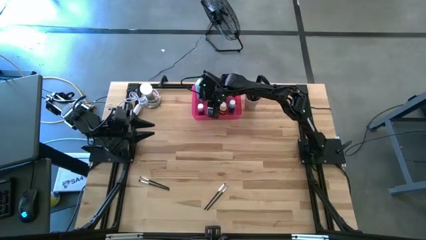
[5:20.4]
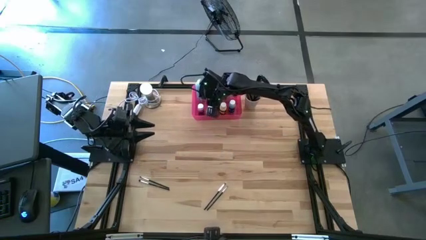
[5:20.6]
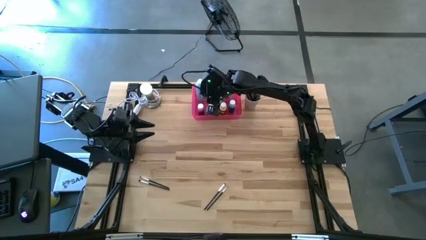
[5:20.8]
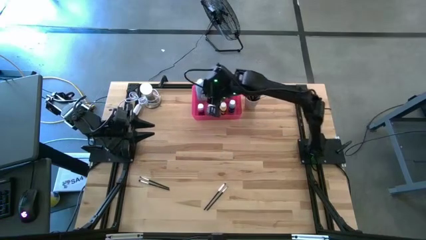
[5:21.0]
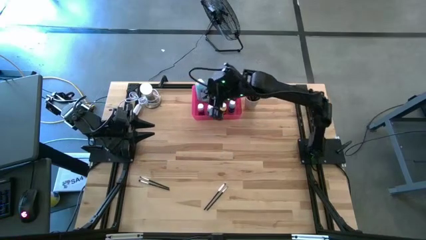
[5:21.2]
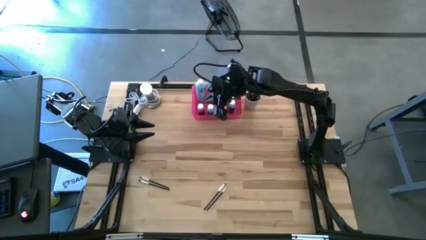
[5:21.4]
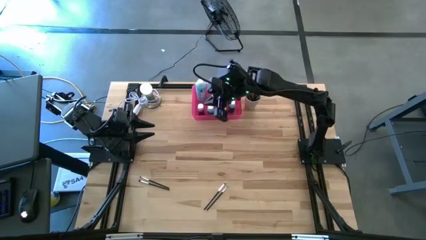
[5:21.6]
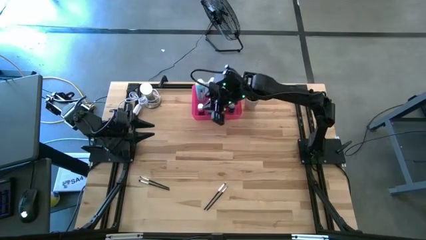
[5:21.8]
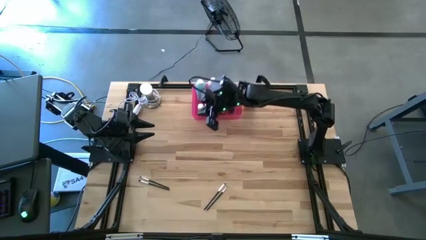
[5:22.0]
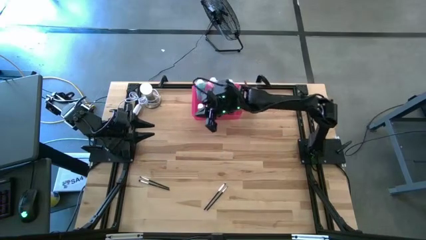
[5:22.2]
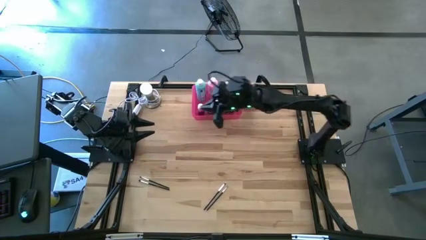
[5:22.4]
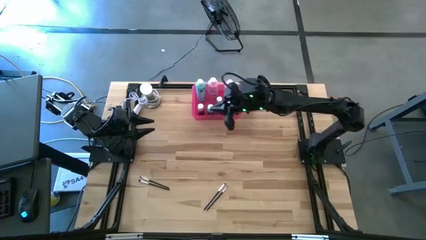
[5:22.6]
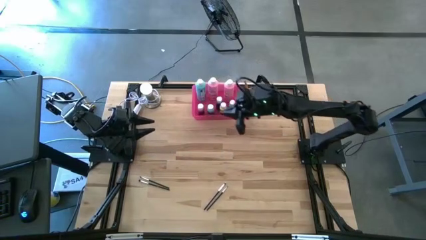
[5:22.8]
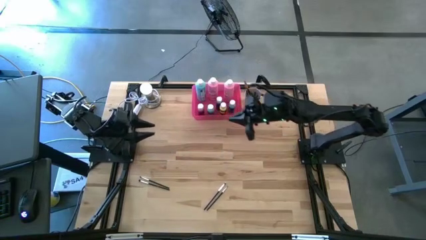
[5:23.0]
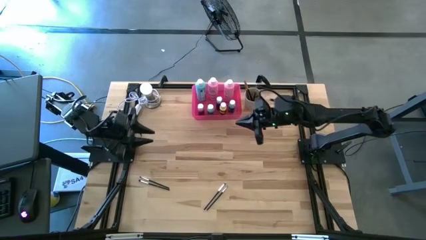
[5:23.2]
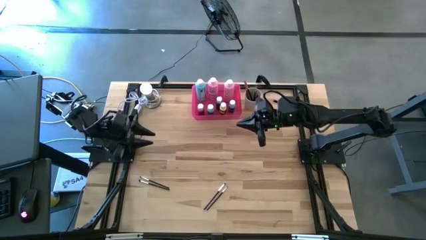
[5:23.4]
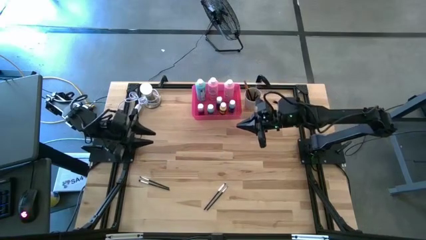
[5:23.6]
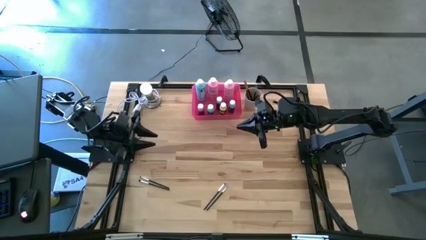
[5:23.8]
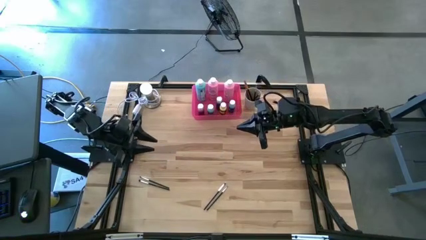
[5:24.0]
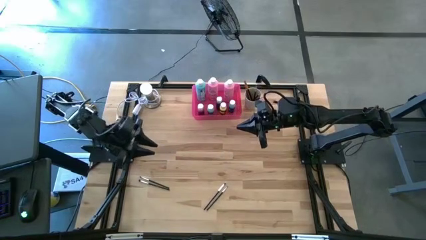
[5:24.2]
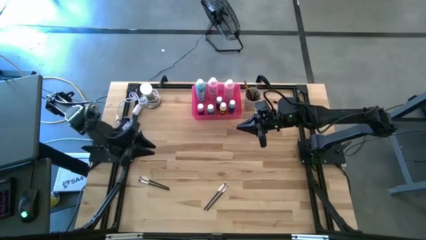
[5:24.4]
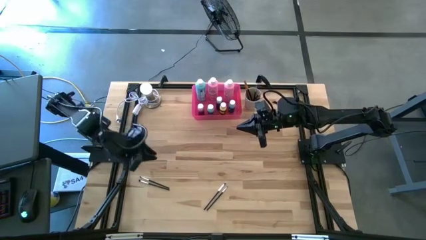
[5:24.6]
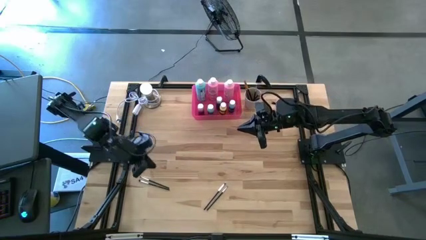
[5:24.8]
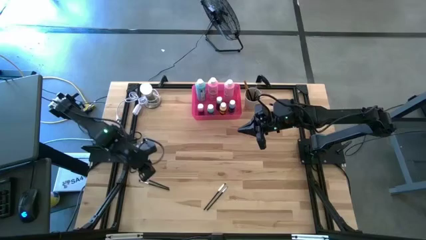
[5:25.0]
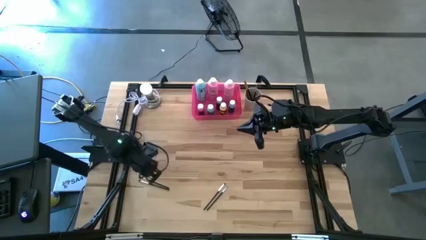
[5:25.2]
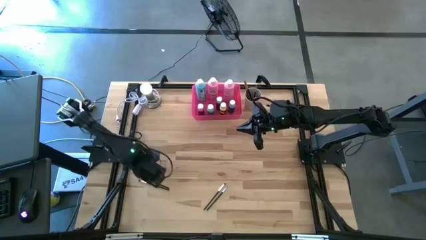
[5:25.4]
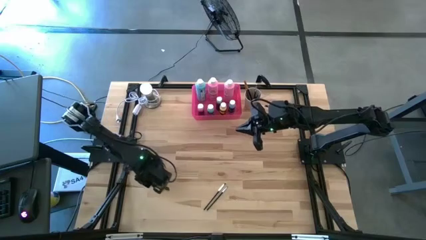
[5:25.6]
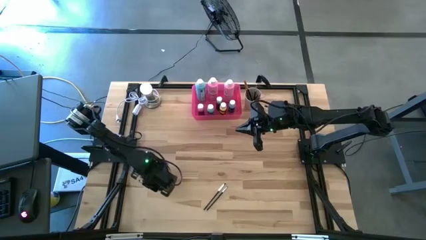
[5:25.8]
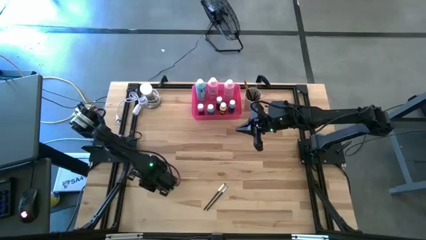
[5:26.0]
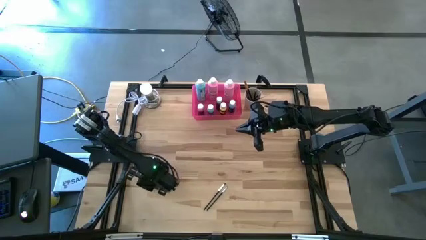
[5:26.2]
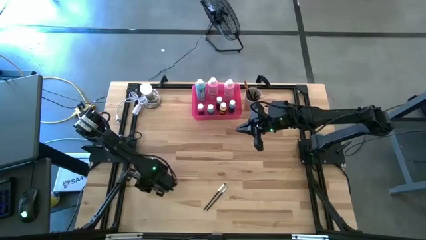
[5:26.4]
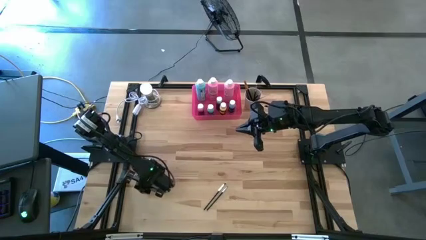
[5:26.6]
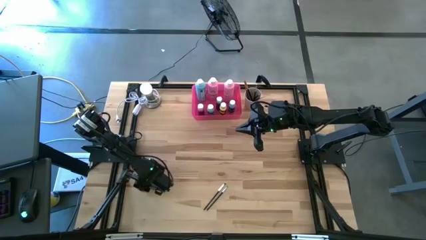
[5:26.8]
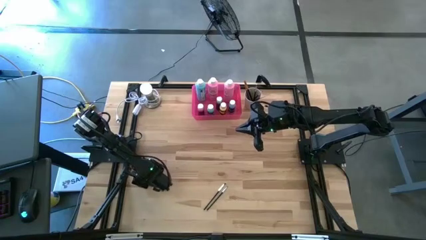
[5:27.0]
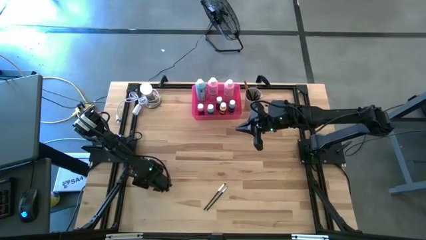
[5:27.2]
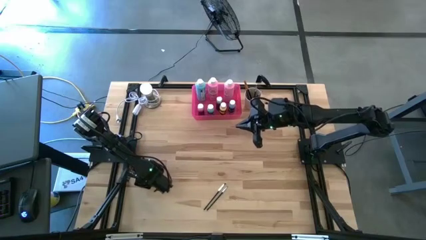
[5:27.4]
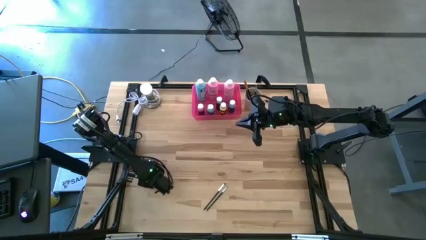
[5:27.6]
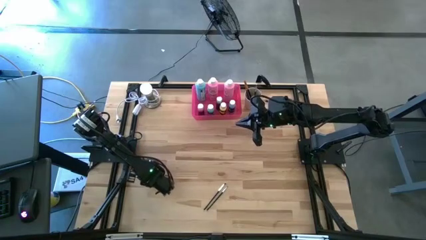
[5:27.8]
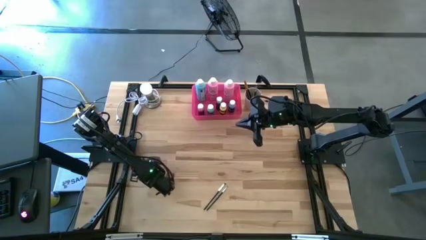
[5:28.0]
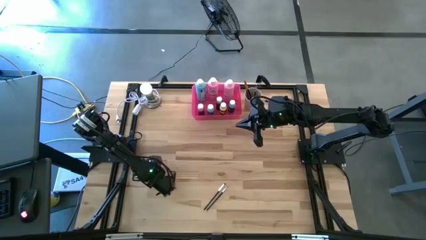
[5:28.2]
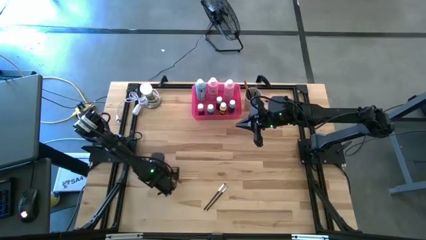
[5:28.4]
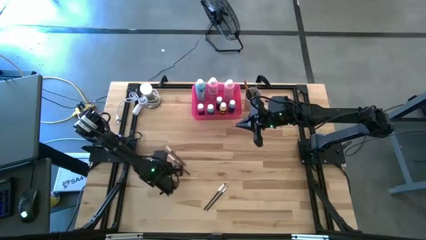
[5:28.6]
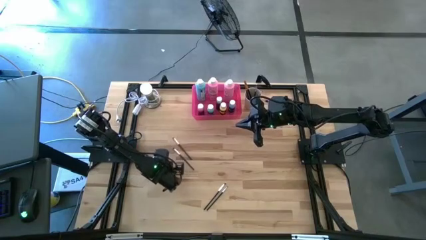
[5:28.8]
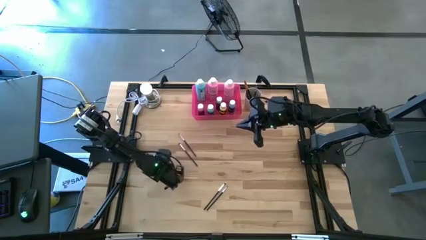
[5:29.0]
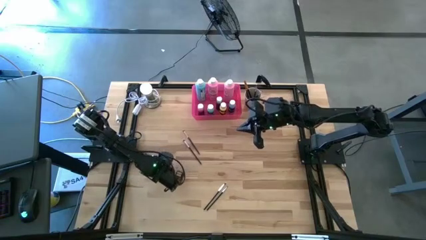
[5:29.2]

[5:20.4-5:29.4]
Task: Pick & Place Paint Supplies
Move the silver paintbrushes to the center of the table

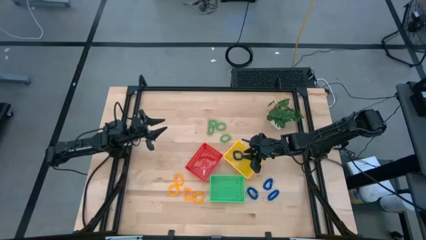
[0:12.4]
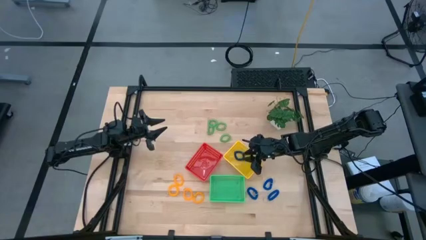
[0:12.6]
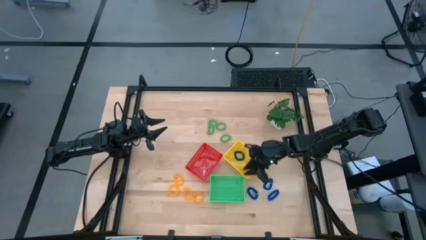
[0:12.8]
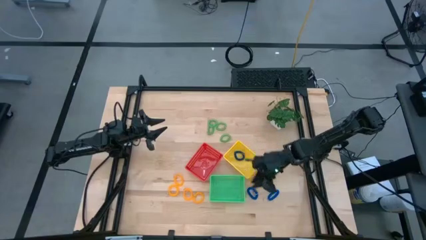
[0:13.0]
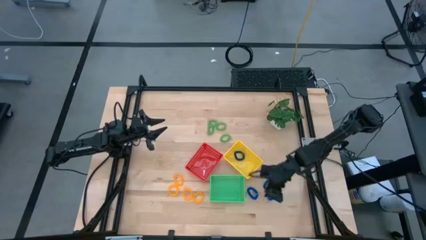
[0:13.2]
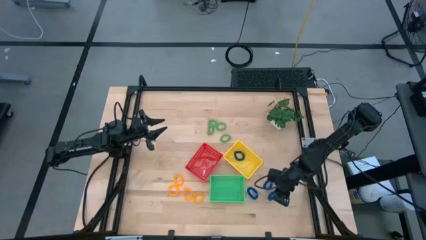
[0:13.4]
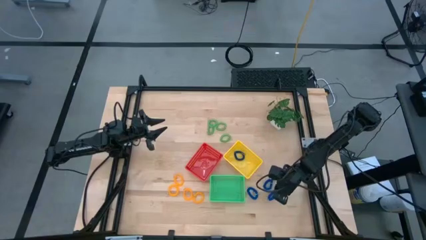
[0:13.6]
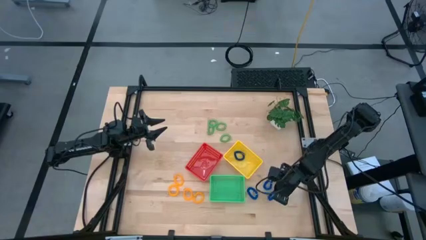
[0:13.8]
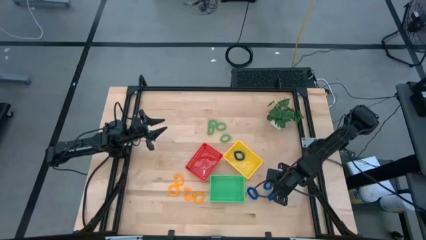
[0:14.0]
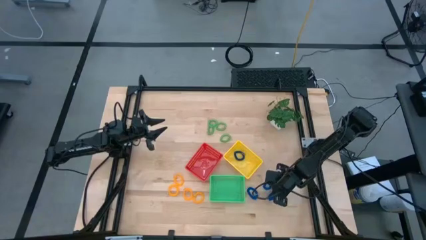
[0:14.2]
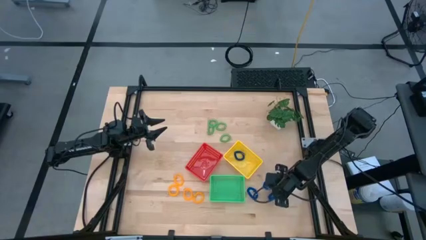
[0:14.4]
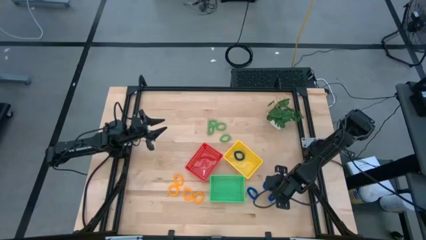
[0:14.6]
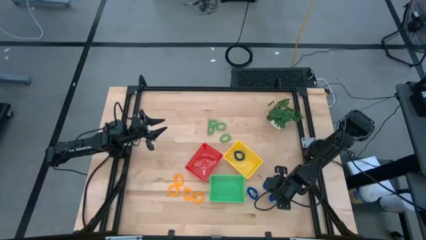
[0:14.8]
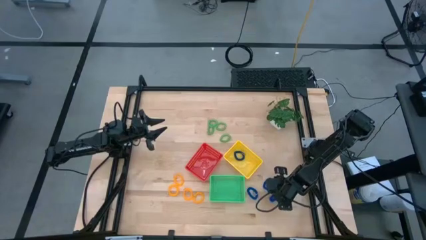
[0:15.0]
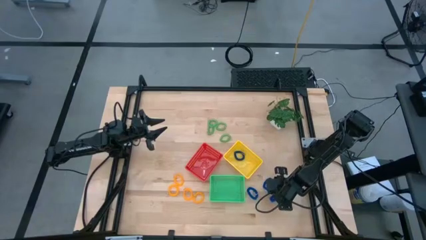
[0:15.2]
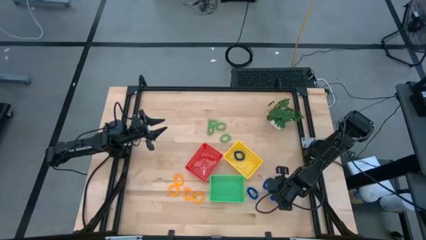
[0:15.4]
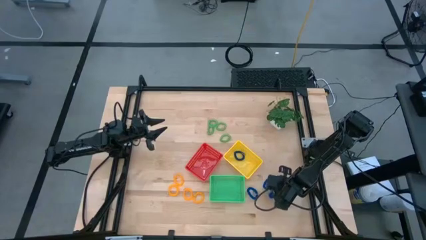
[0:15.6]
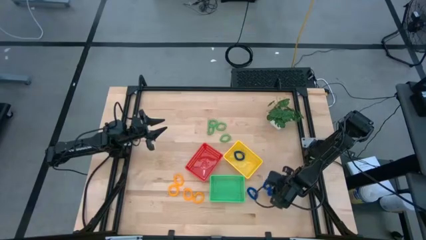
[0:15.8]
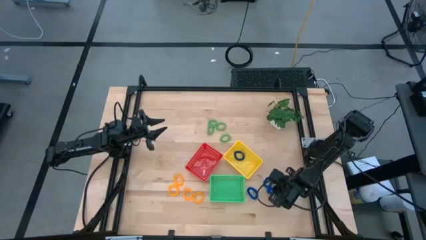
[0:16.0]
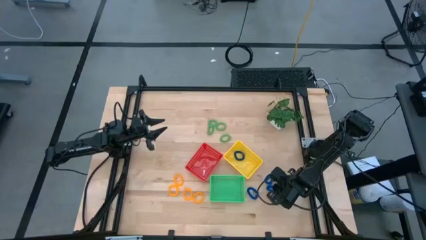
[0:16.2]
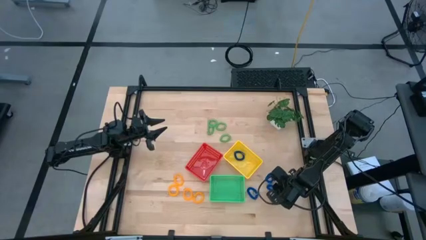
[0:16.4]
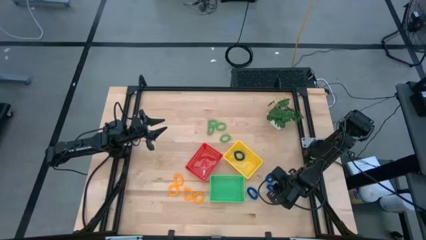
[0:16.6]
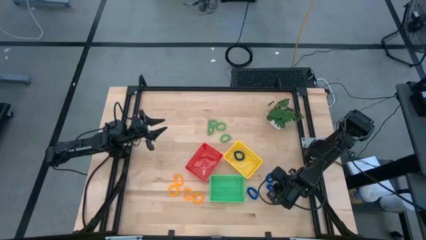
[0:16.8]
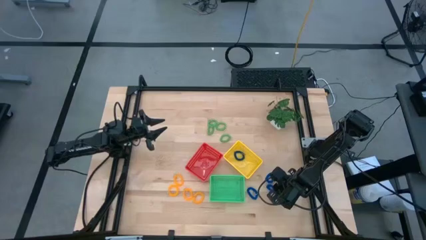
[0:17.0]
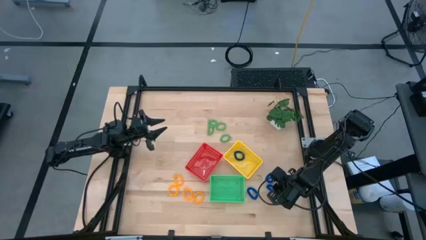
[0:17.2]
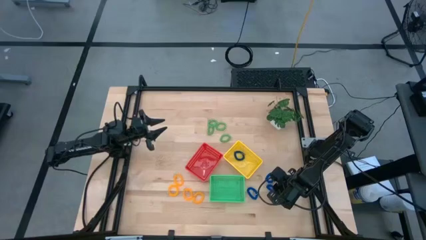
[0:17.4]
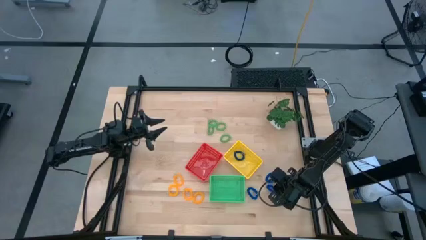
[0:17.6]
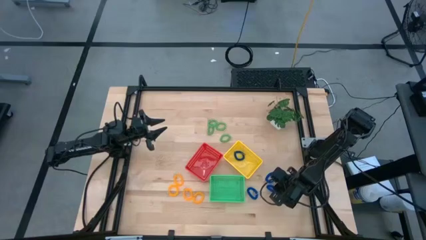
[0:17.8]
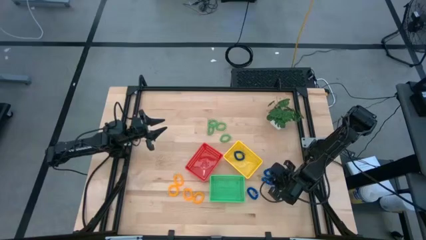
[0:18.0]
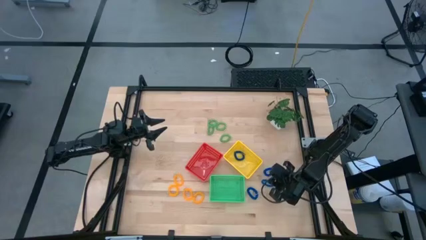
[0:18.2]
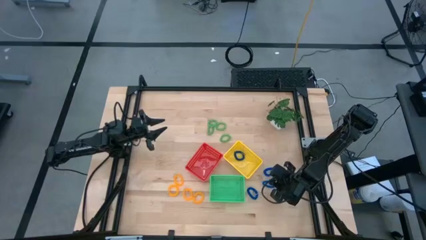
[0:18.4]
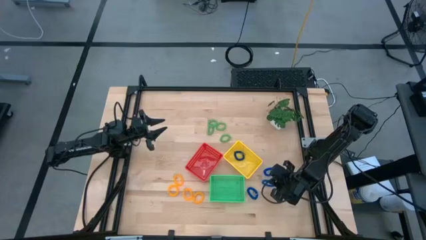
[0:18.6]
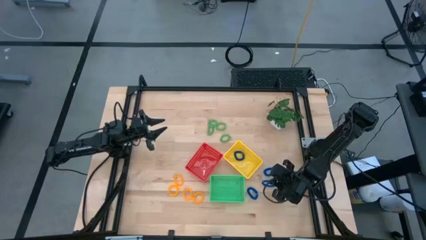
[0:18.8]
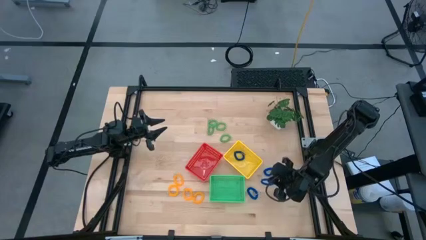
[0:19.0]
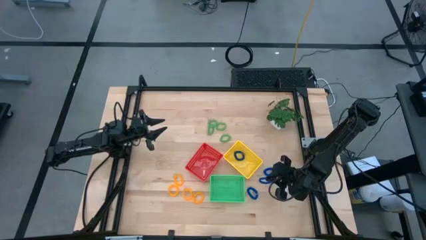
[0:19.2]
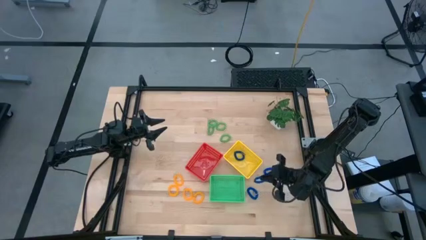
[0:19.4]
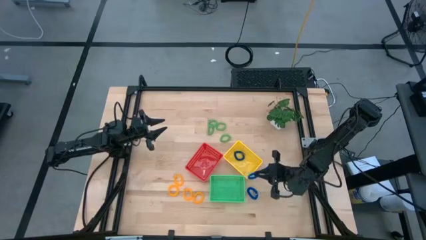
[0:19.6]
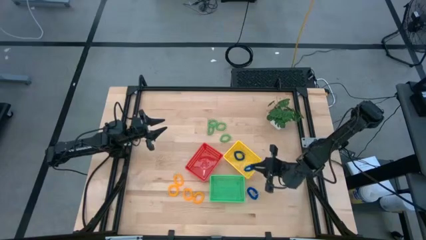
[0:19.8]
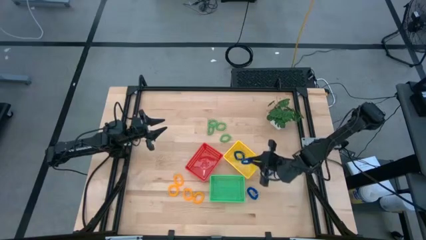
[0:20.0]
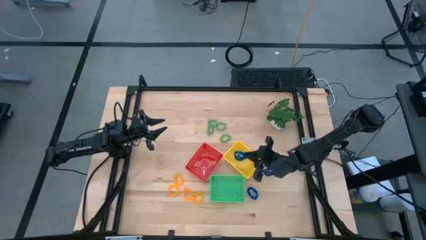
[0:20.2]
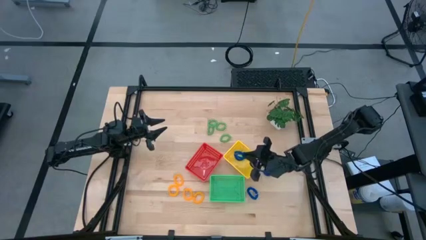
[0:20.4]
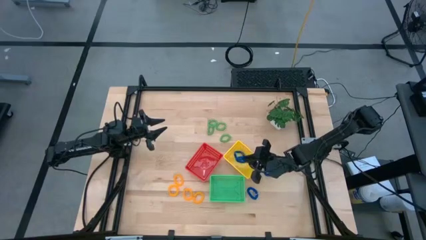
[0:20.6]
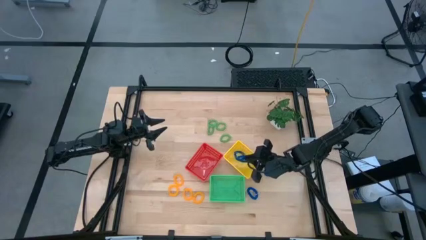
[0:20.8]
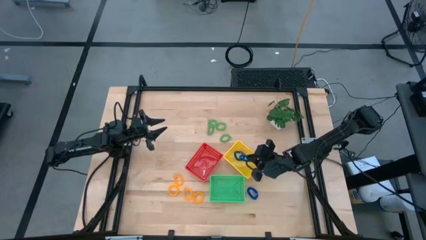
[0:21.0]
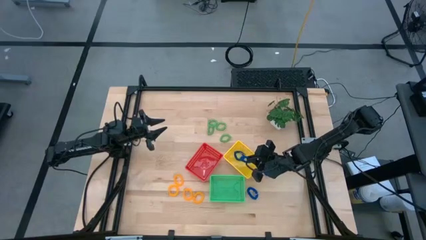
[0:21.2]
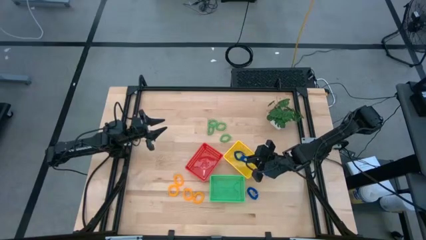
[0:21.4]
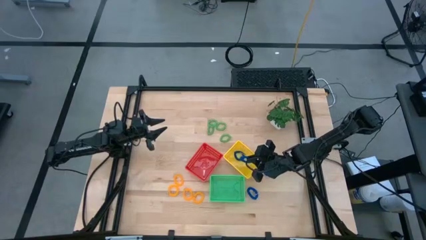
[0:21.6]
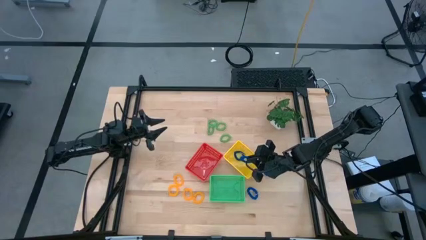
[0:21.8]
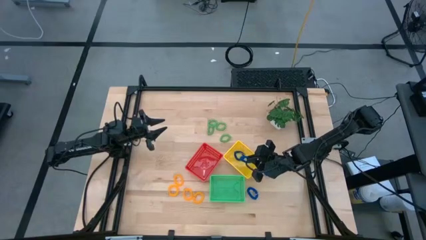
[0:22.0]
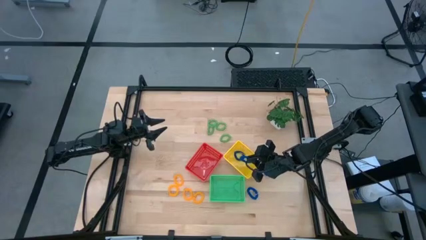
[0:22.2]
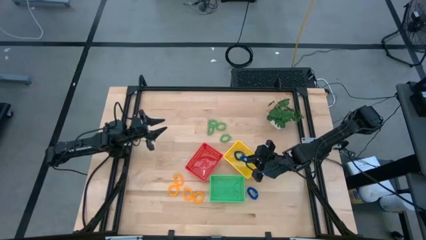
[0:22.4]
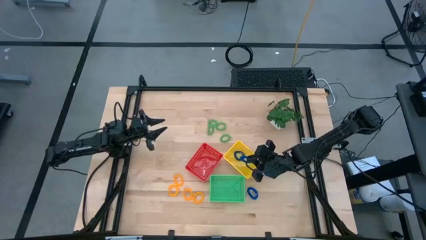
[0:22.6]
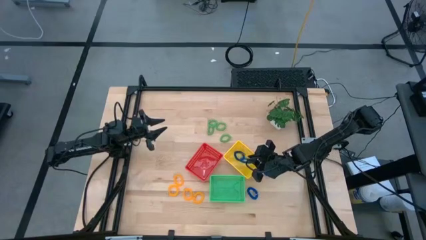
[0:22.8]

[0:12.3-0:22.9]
Task: Sort spring keychains
Put the blue spring keychain into the yellow bin
